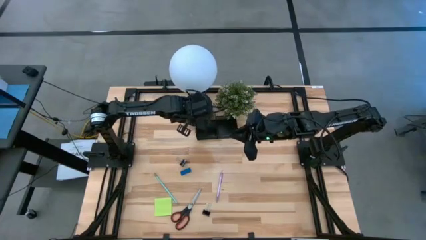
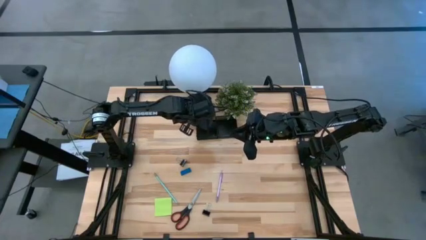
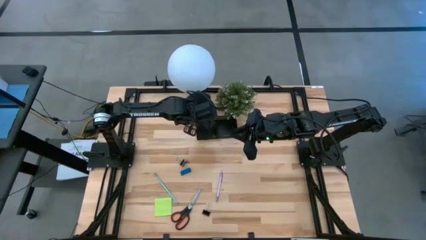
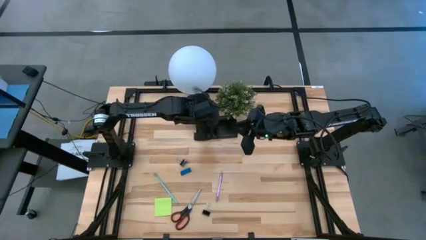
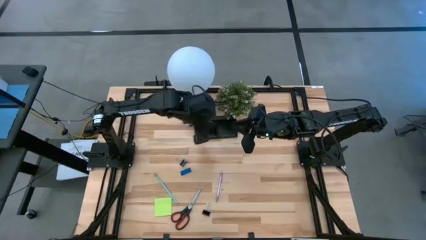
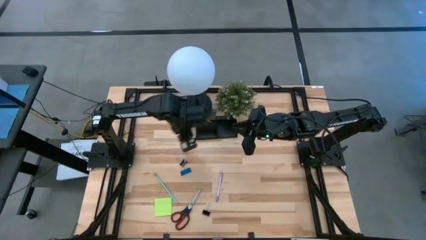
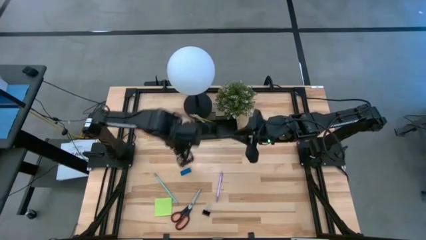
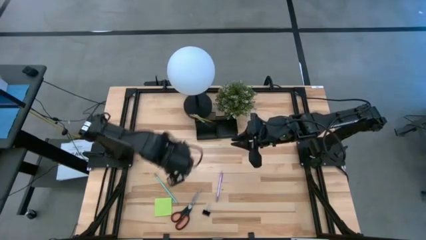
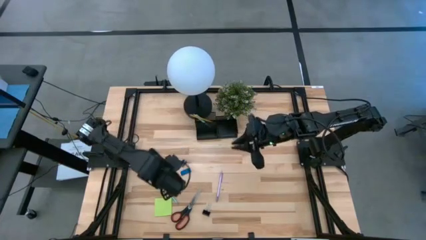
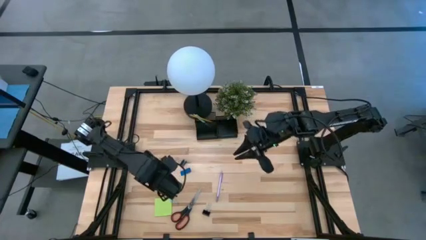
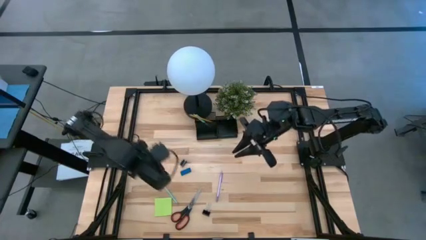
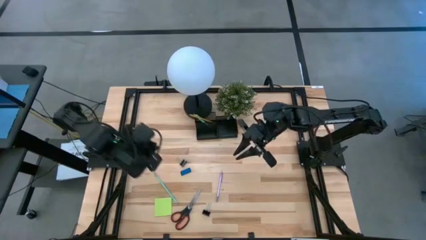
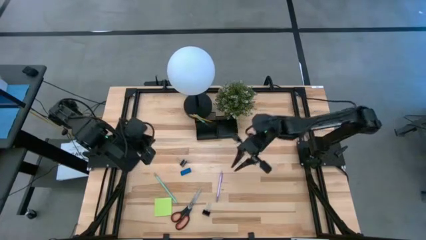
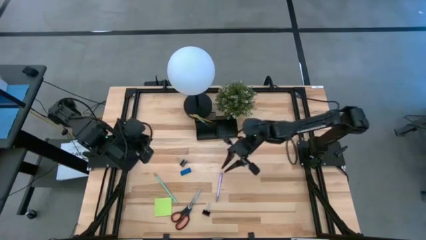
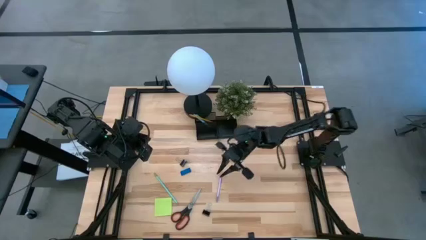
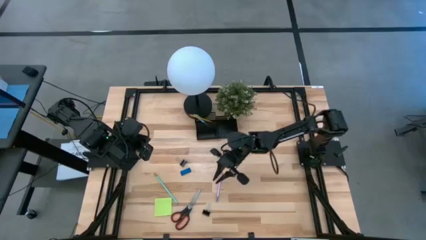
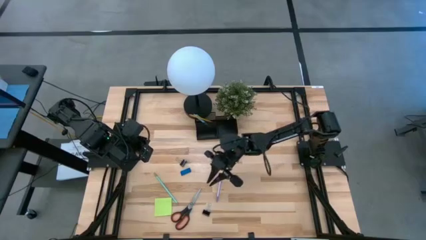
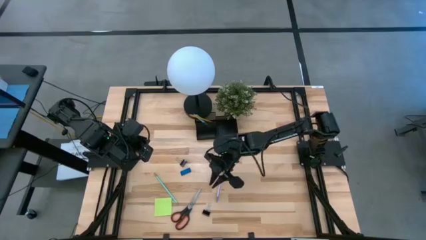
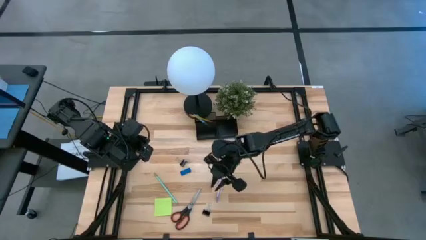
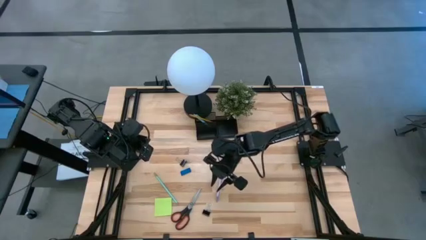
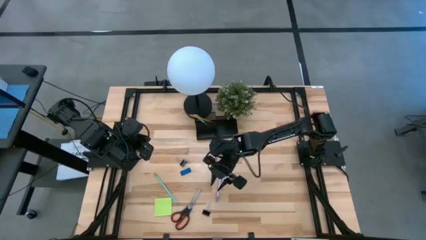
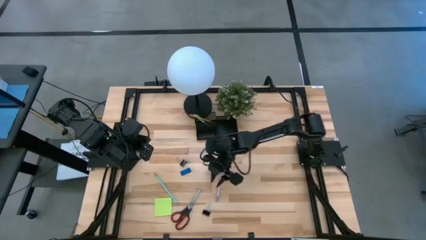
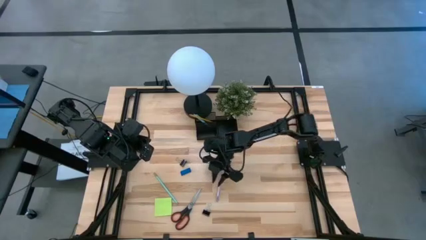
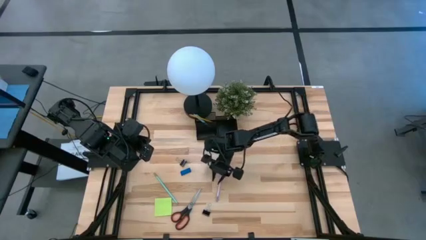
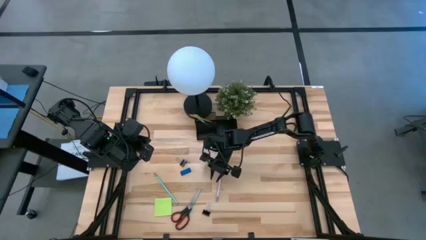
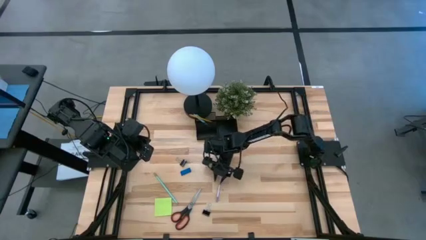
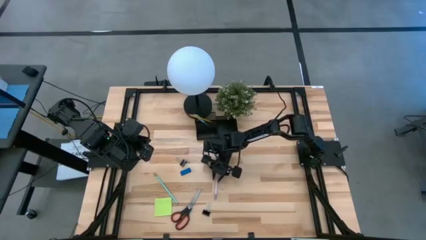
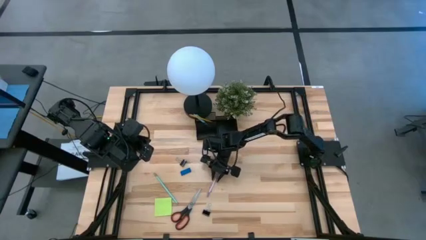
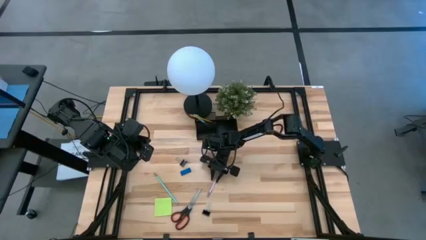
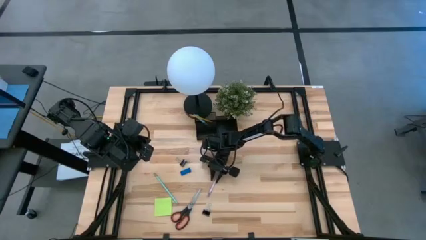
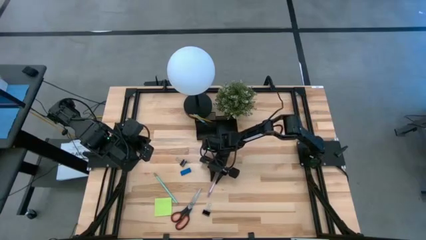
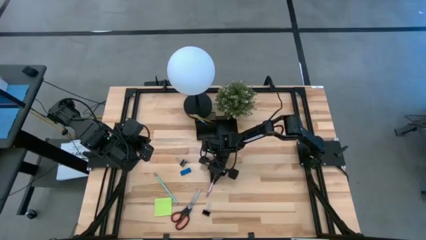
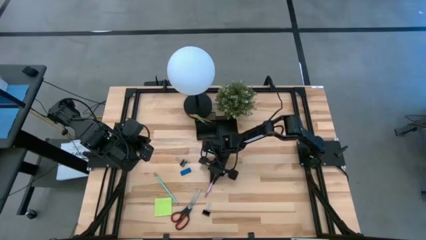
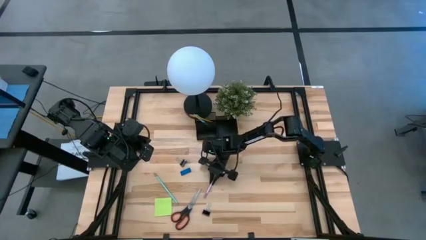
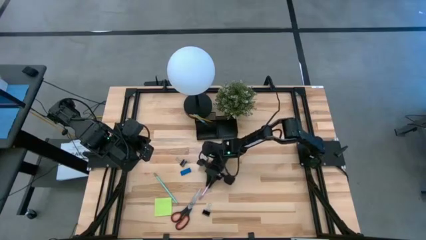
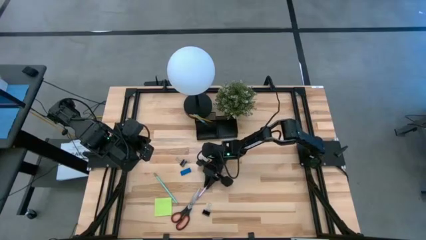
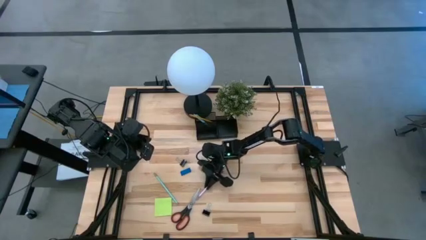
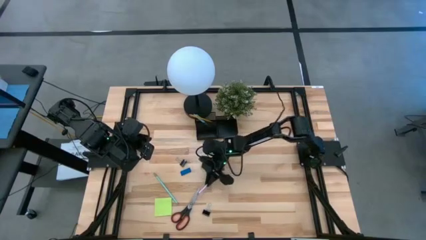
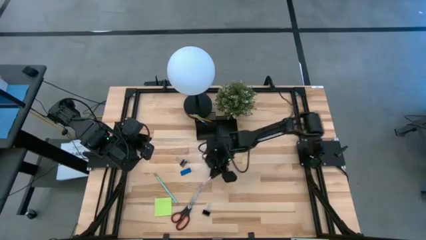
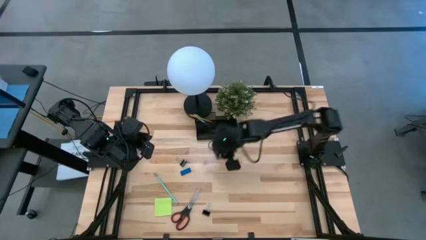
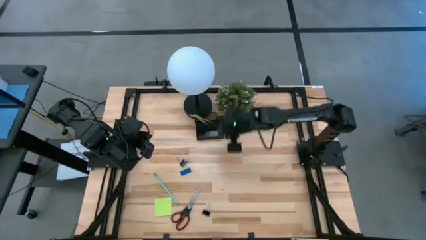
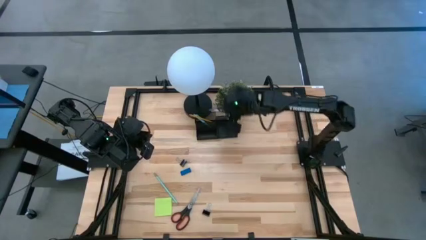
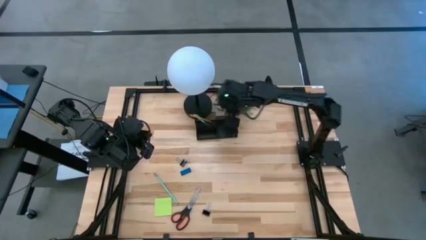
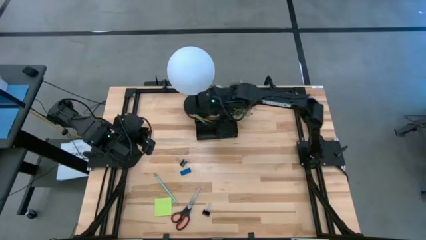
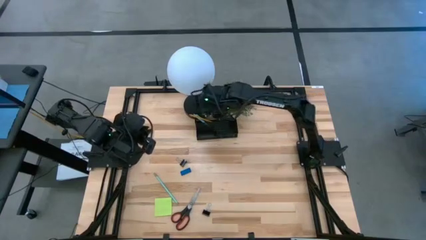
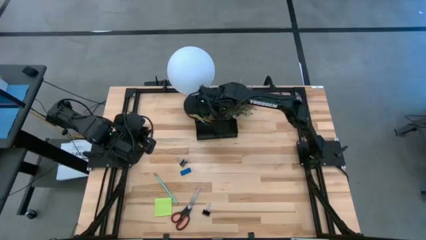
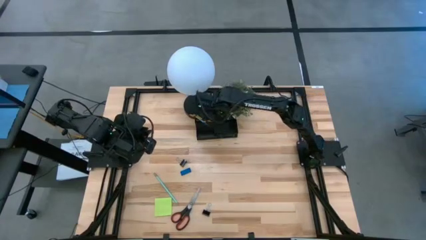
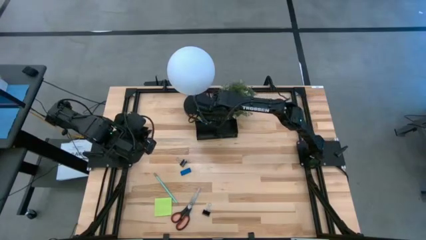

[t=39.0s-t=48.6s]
Task: Pick and place office supplies into organizer
Put the purple pen into the black desk organizer

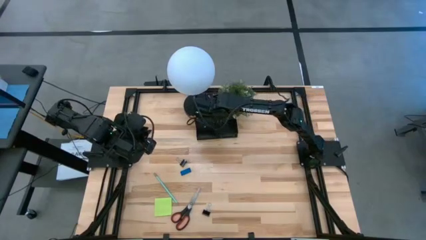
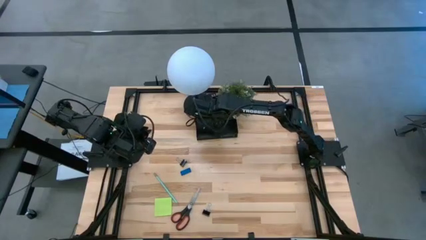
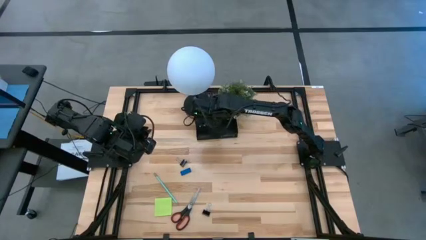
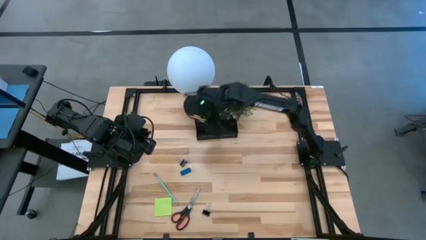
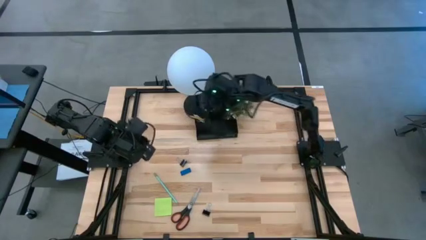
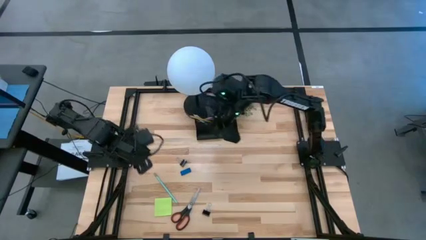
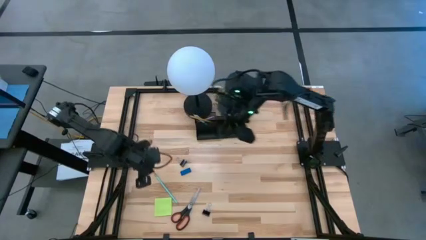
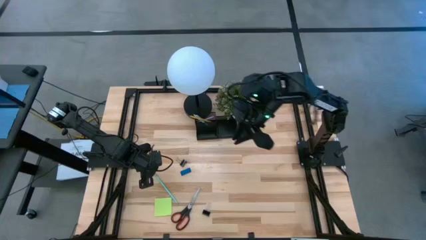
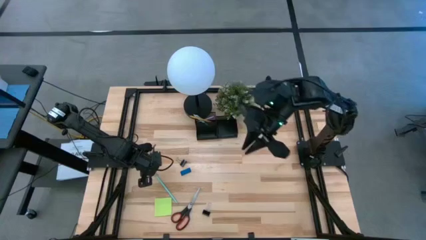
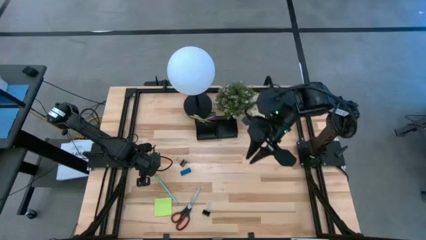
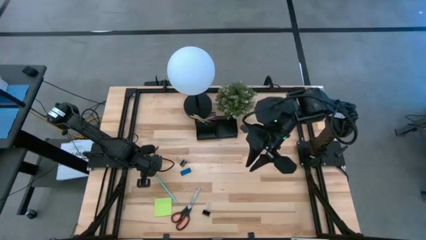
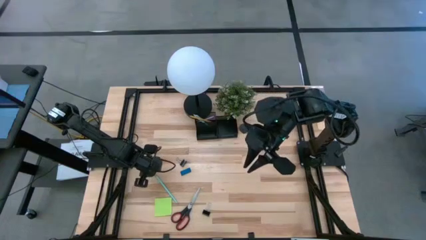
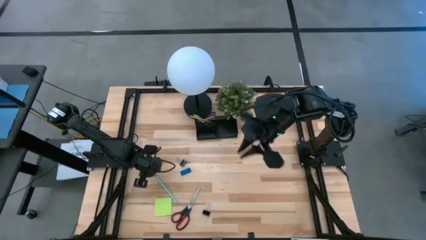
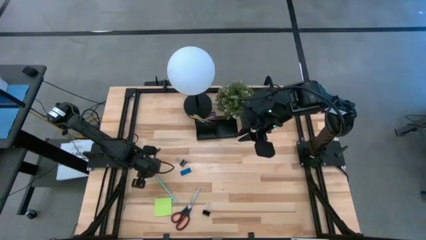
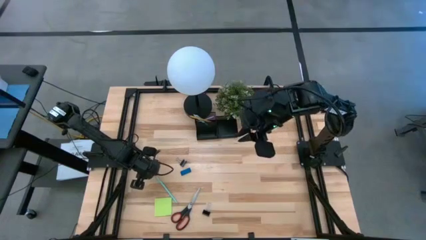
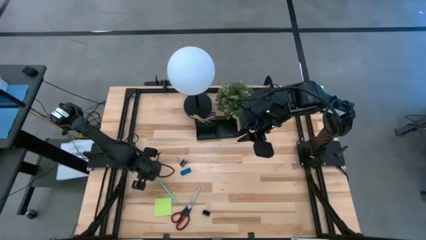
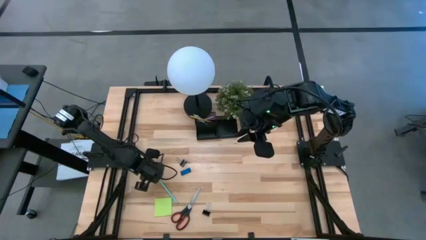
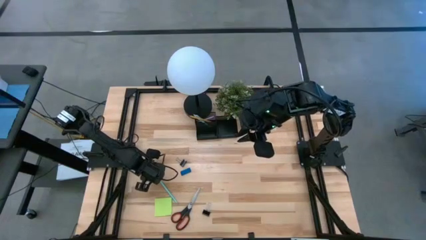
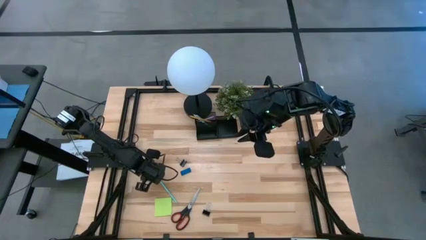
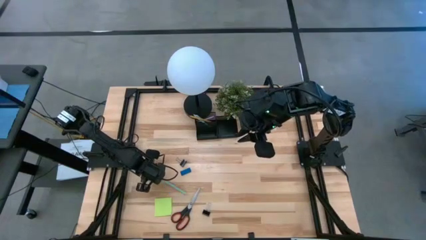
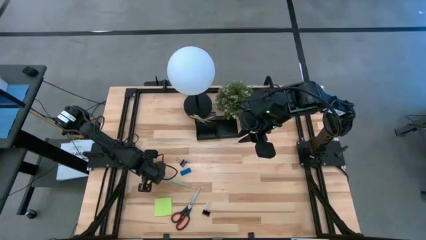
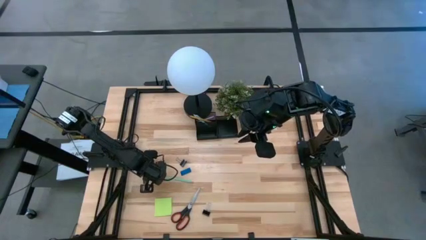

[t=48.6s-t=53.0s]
Put the blue pencil into the black desk organizer

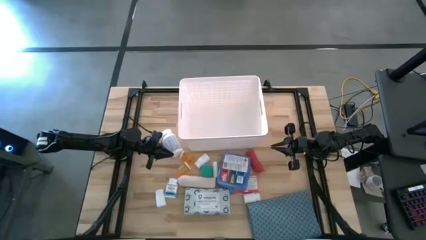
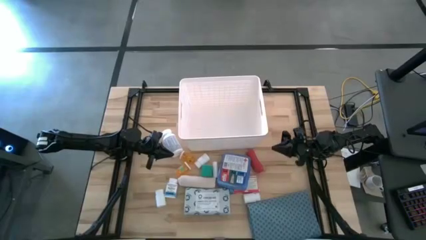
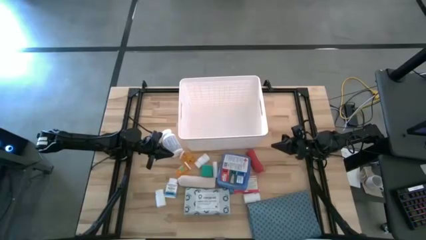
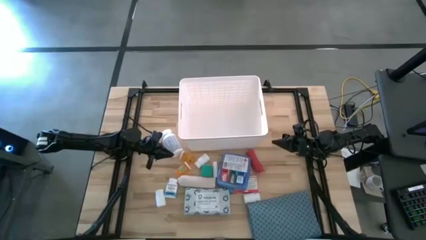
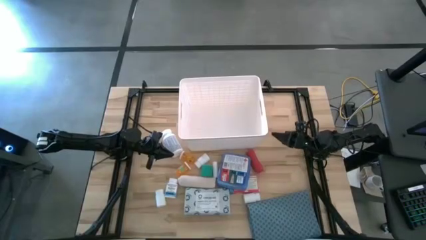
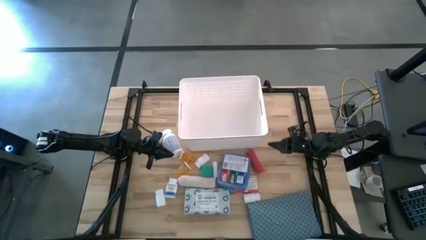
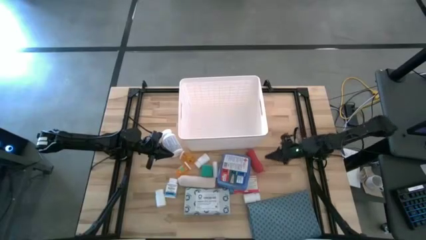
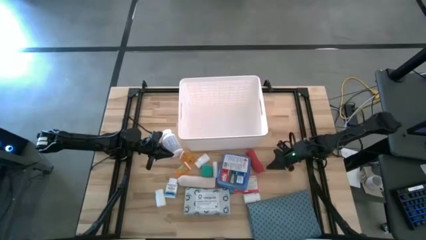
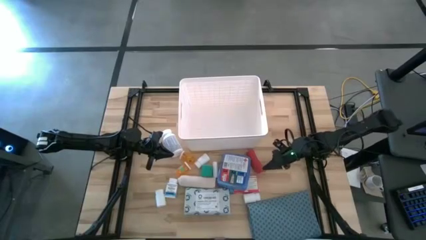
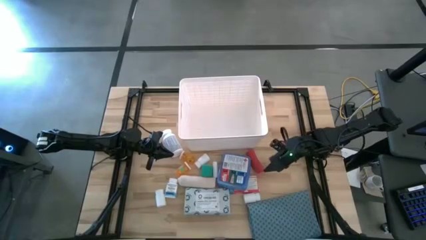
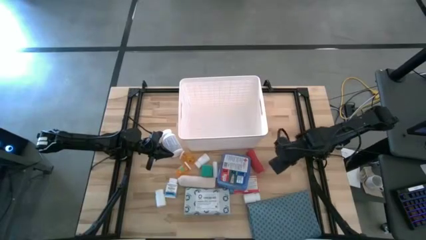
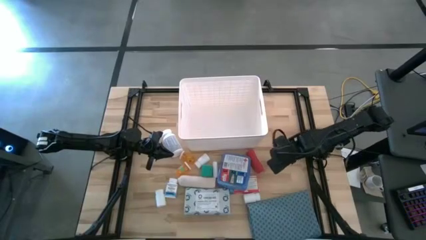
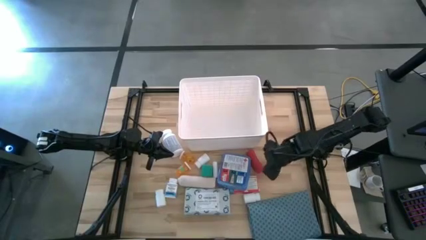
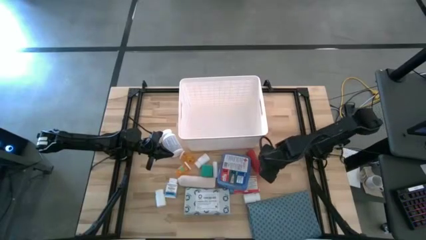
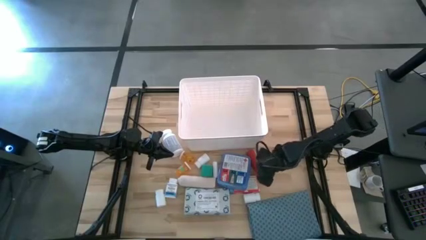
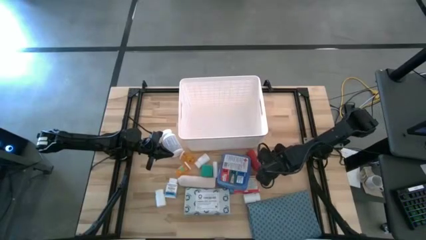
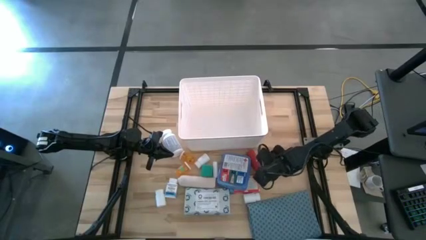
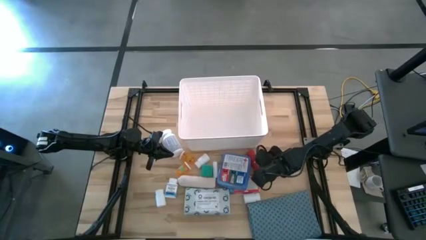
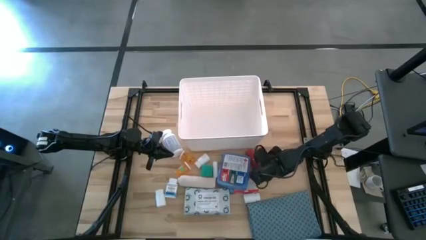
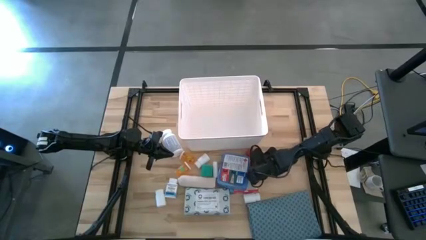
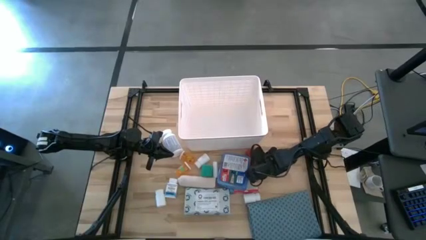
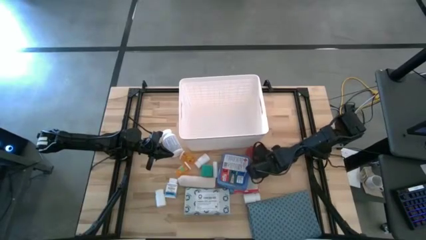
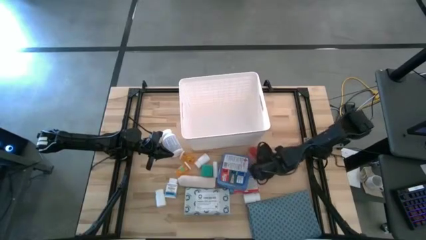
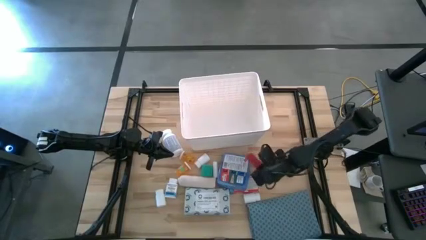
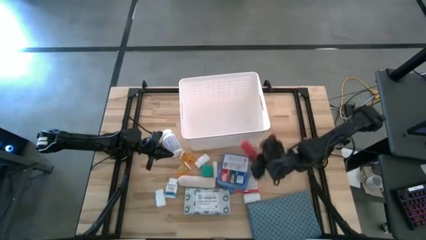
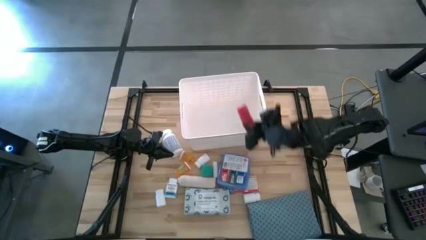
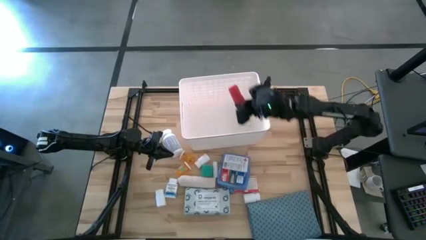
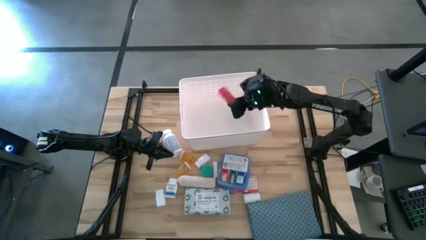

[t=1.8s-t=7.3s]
Task: Pick & place medical supplies in basket/bin
Put the red bandage into the white bin
